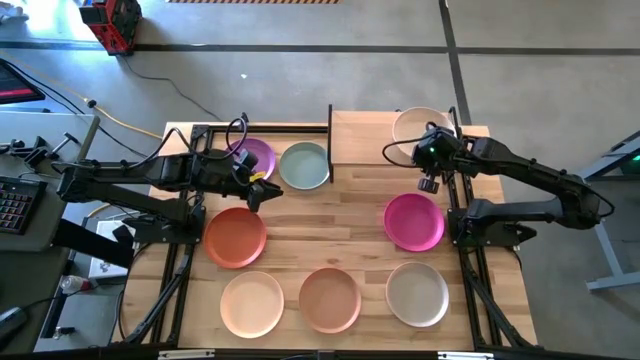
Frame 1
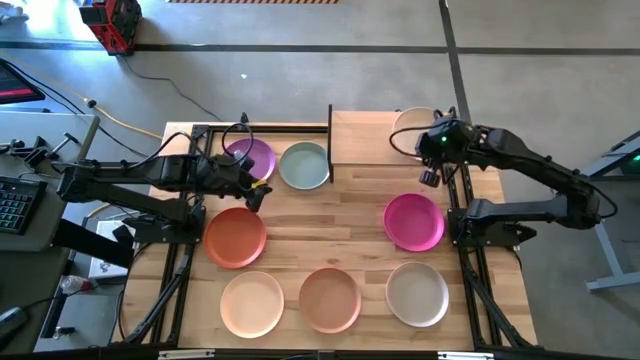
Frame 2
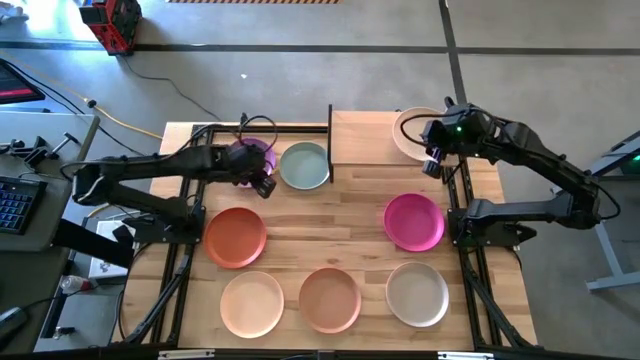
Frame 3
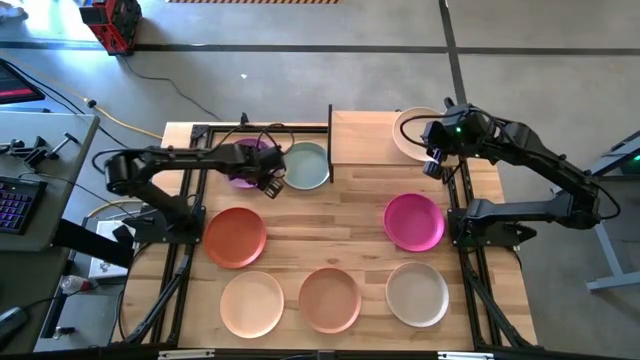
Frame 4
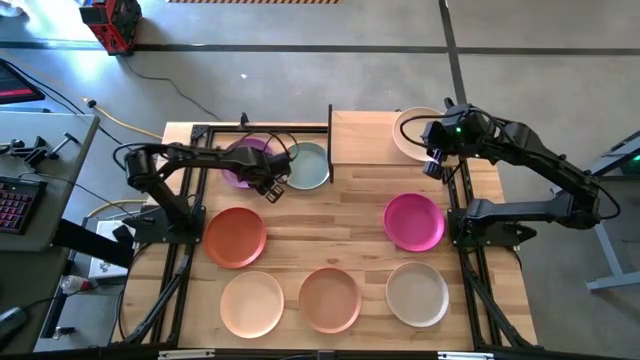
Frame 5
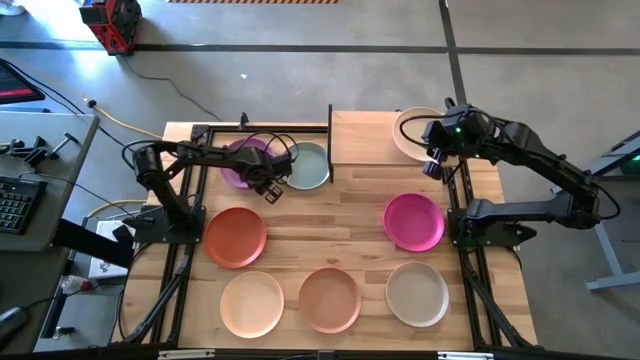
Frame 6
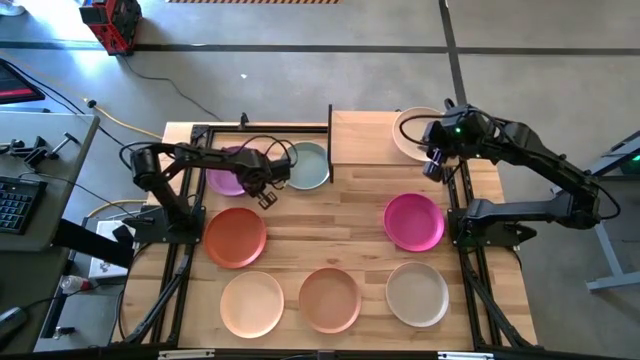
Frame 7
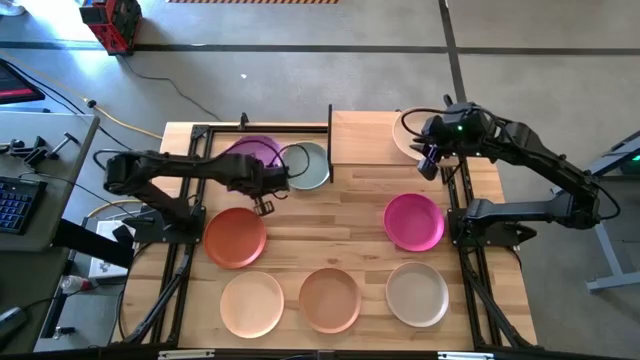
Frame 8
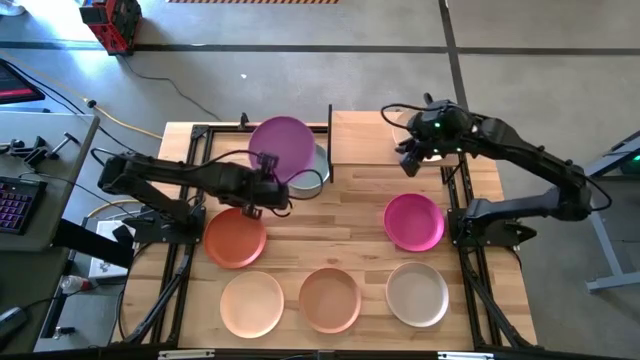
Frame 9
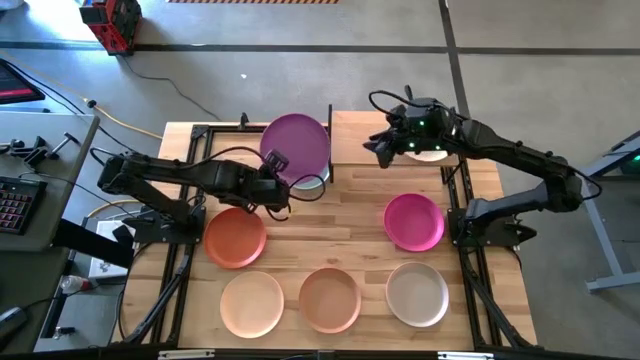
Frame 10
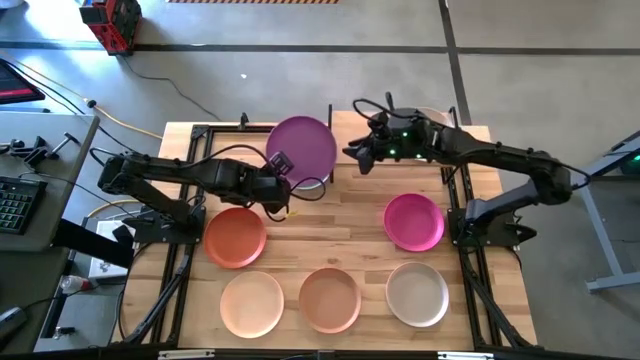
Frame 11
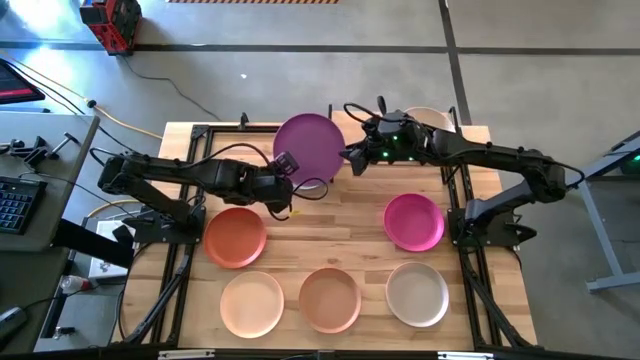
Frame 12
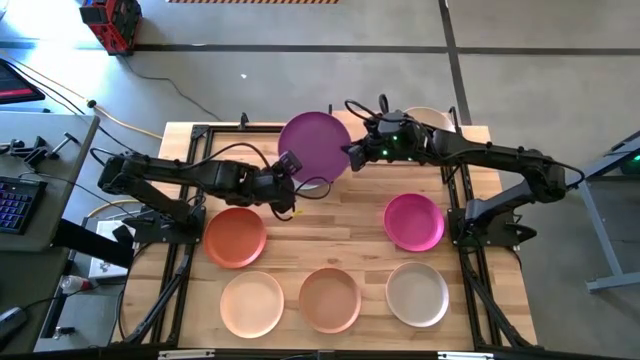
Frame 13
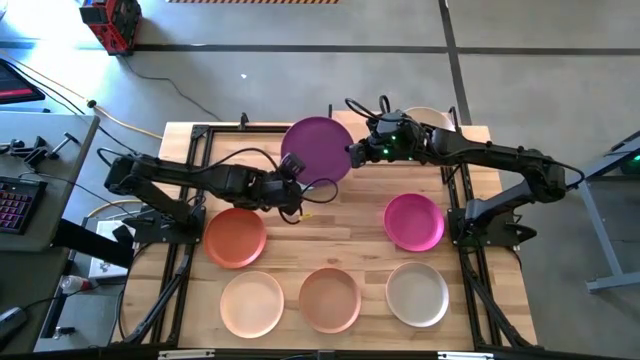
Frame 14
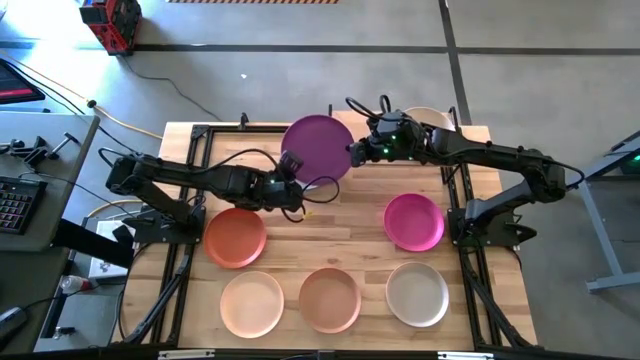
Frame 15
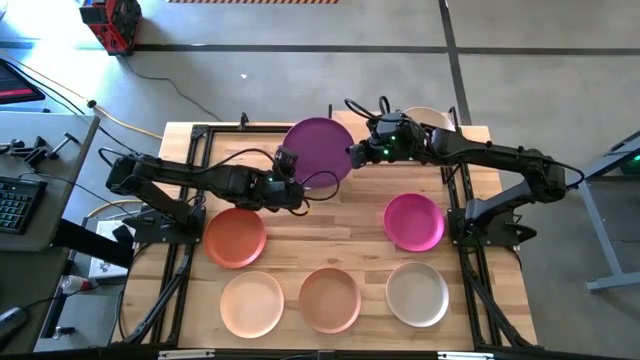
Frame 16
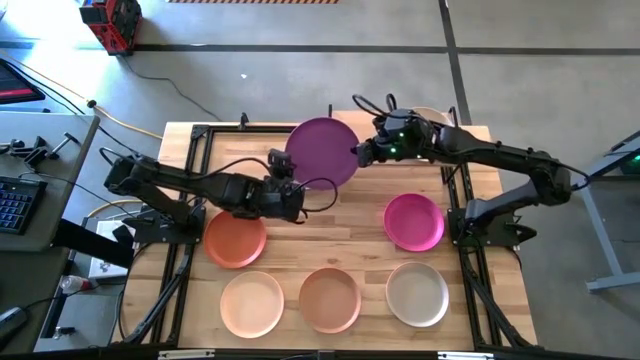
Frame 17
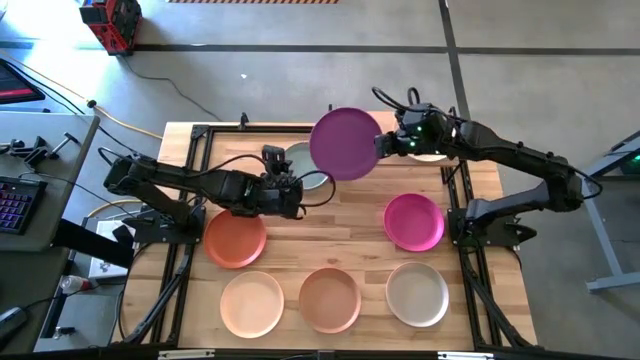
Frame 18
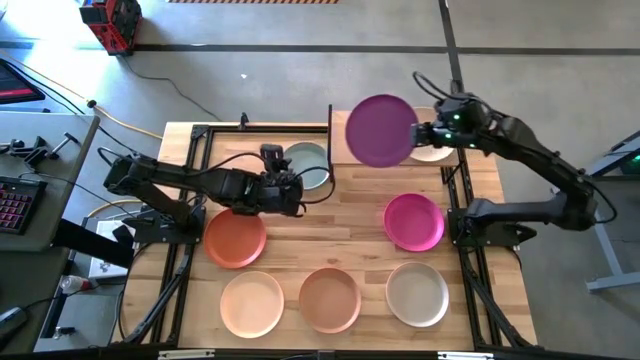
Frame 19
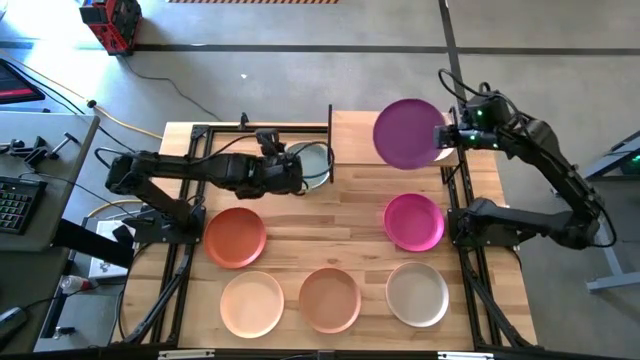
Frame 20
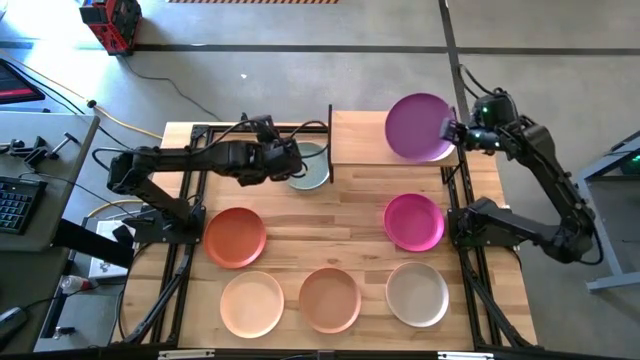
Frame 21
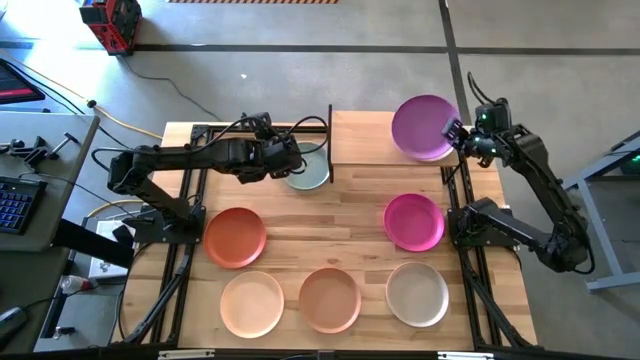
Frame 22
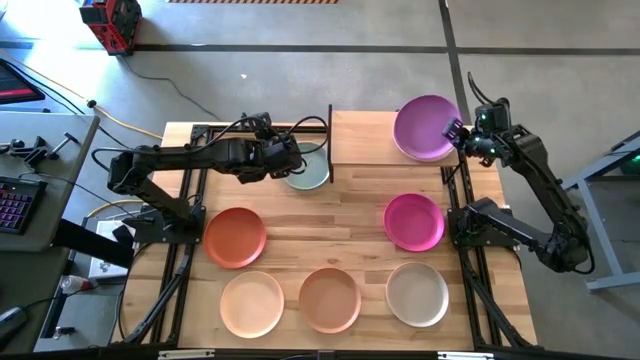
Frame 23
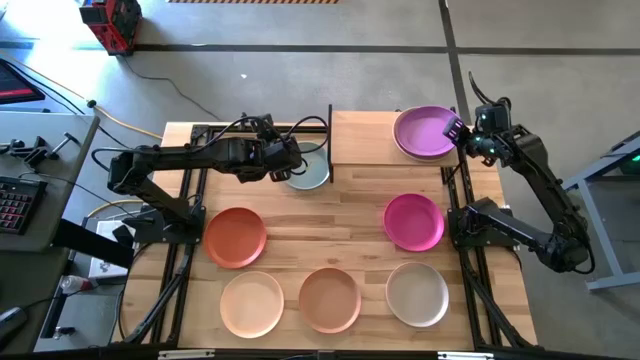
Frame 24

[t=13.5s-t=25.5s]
Task: Place and stack plates onto a shelf
Stack the purple plate on the white plate on the shelf

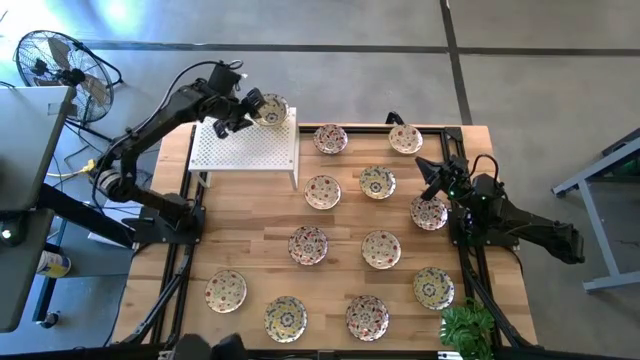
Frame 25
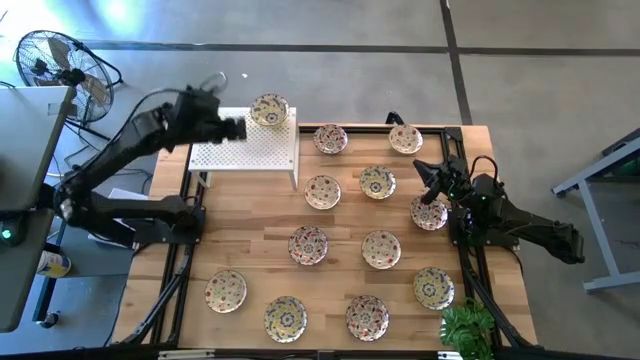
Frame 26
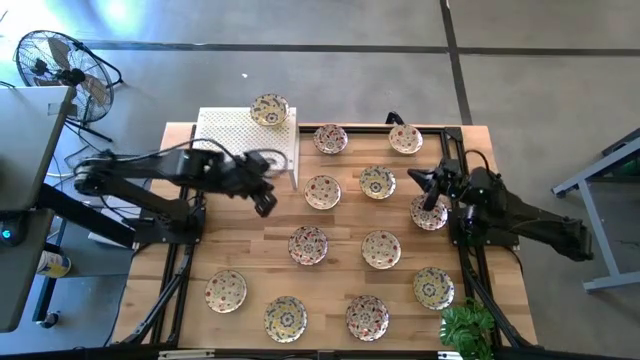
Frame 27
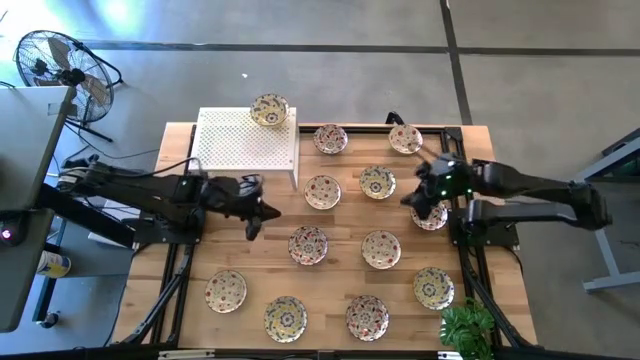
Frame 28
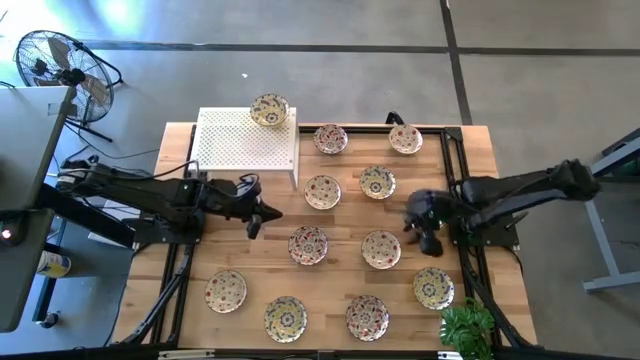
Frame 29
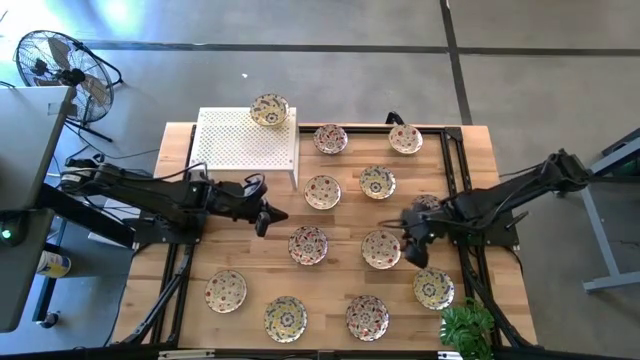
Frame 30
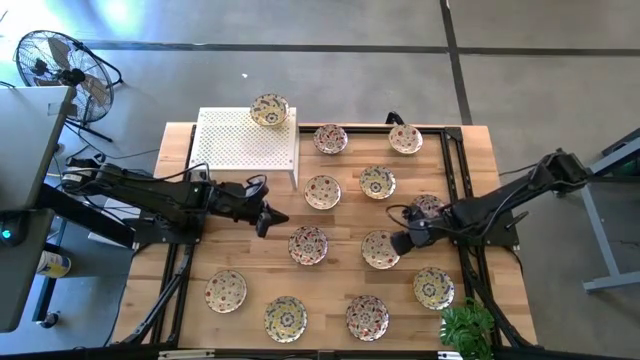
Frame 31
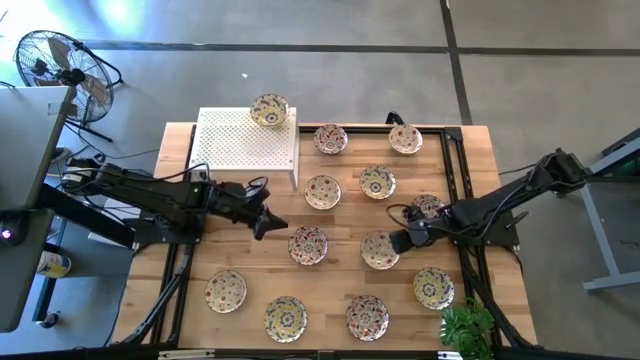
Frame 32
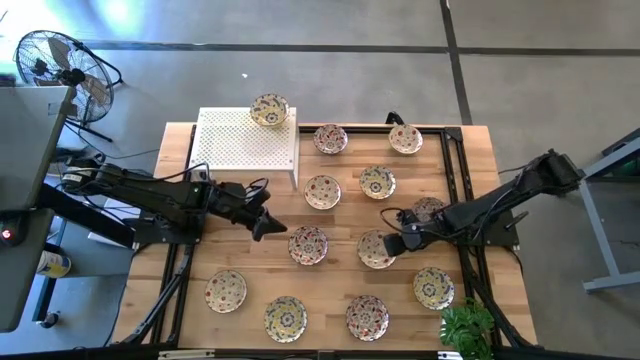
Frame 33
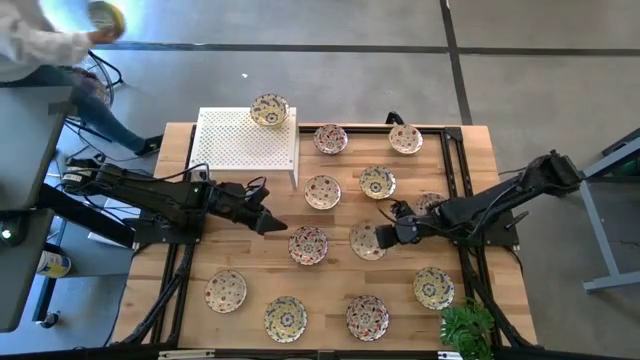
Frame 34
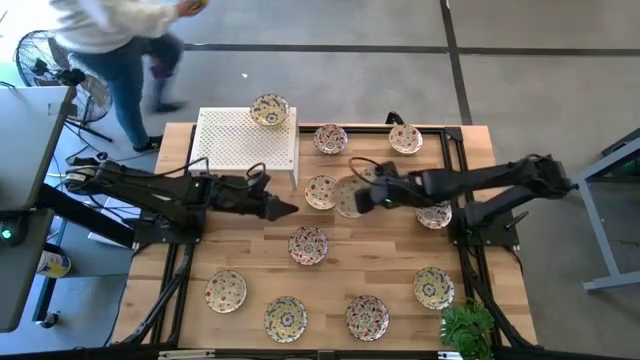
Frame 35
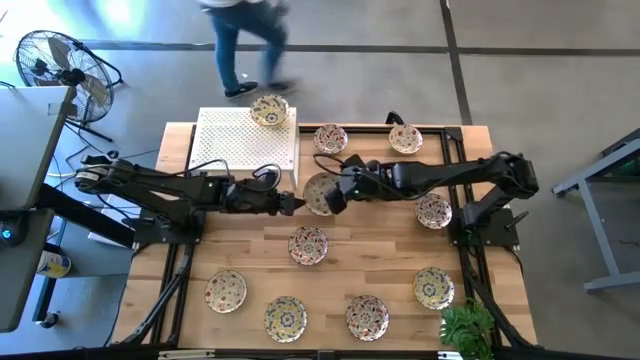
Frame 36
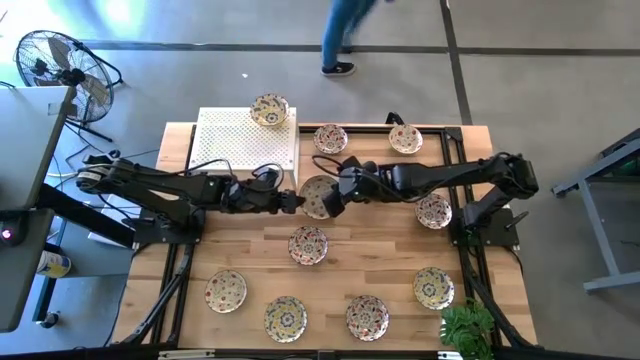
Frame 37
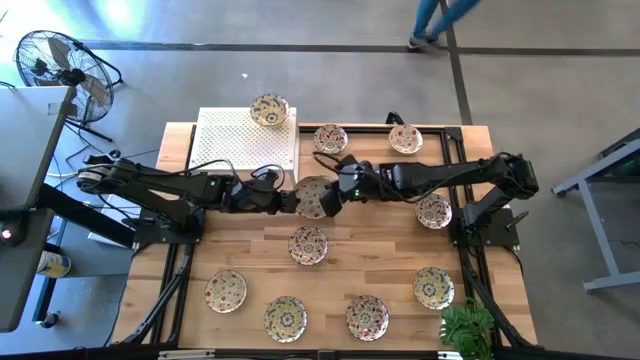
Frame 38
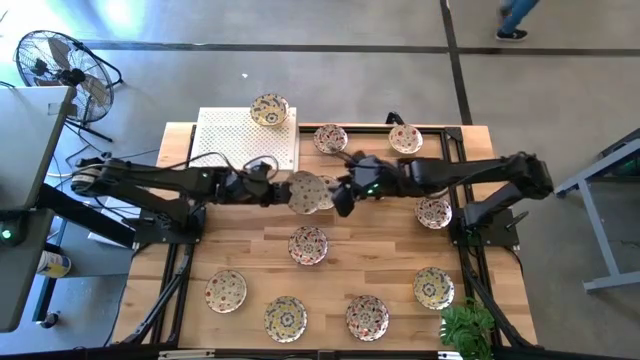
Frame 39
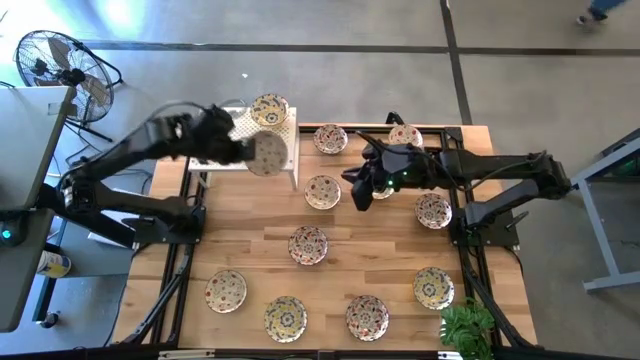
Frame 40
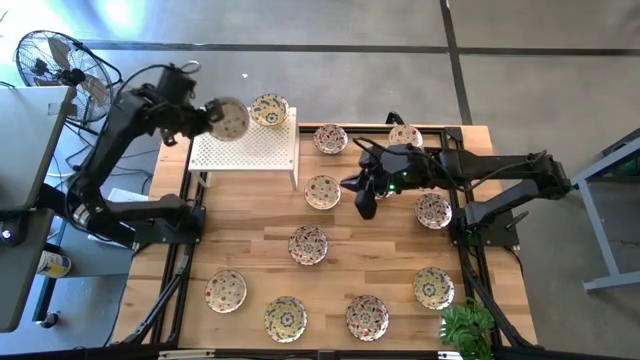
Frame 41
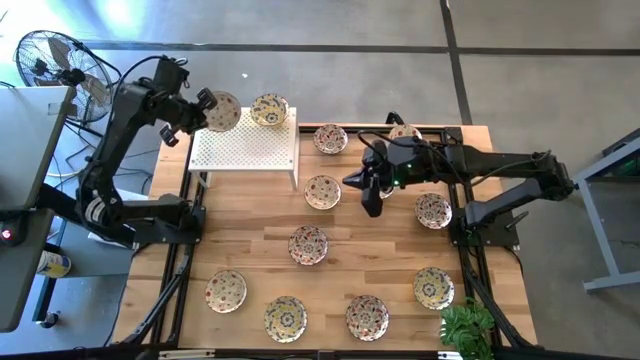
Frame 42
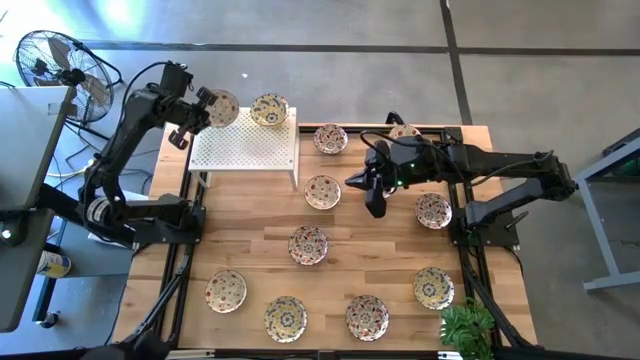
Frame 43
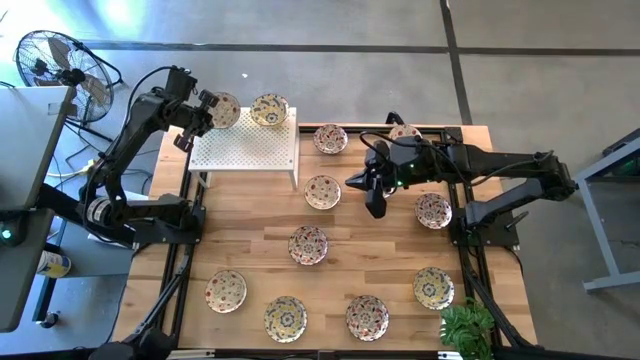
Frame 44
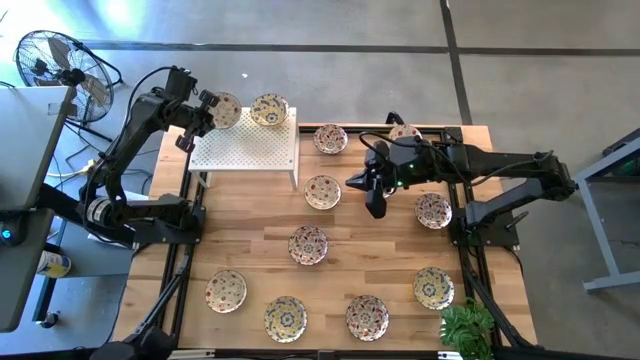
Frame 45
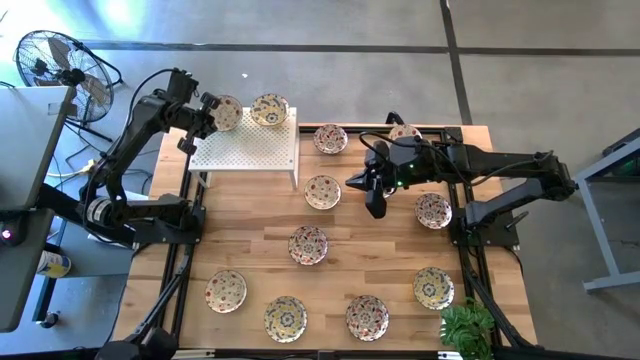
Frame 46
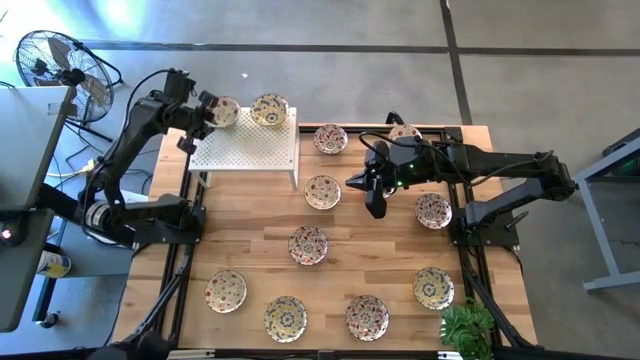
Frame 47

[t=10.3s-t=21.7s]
Task: Pick & Place Mini bowls
Put the red patterned bowl on the shelf
